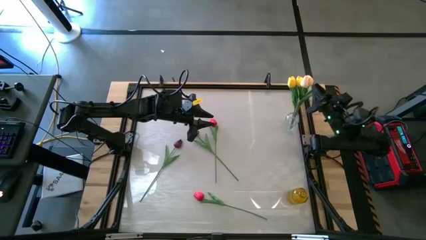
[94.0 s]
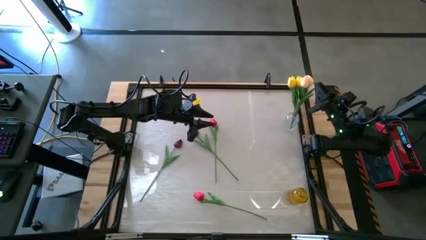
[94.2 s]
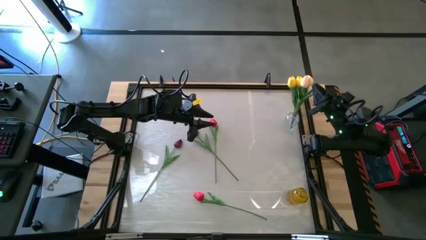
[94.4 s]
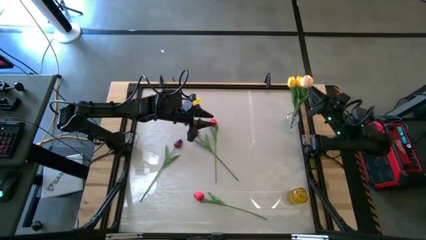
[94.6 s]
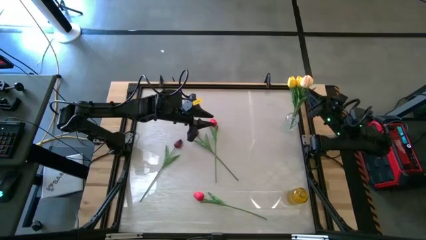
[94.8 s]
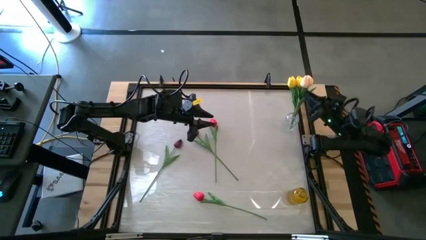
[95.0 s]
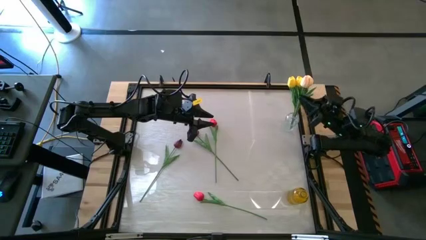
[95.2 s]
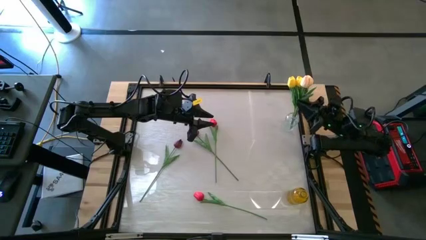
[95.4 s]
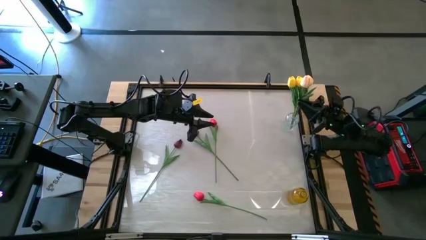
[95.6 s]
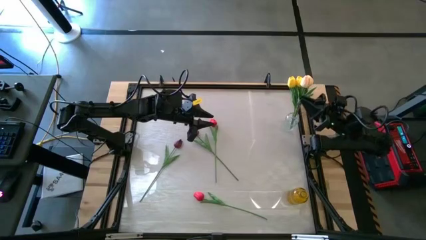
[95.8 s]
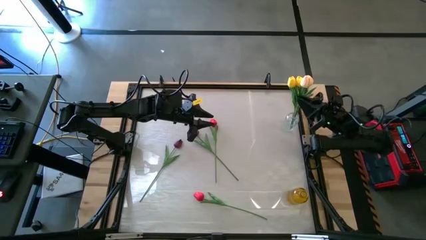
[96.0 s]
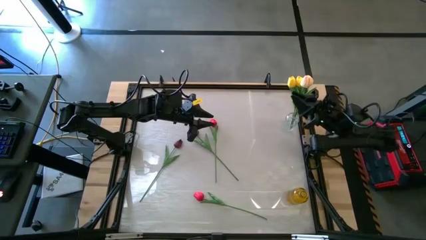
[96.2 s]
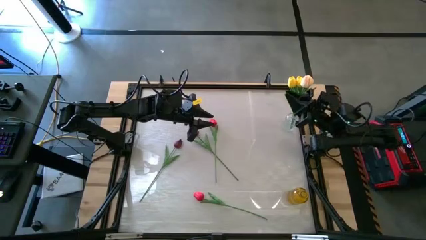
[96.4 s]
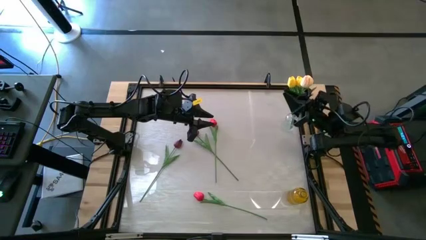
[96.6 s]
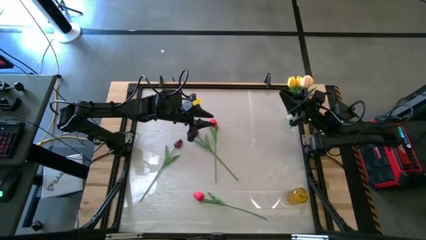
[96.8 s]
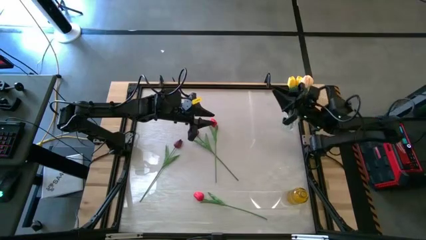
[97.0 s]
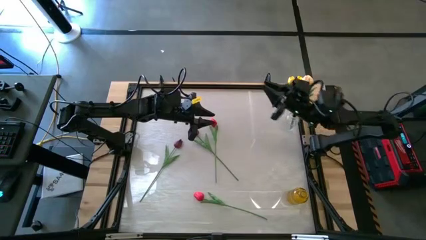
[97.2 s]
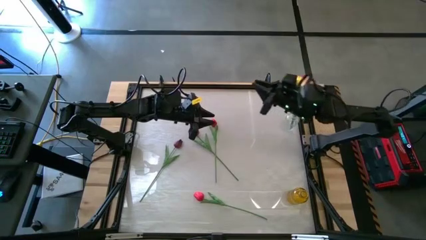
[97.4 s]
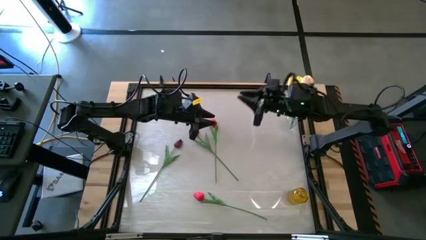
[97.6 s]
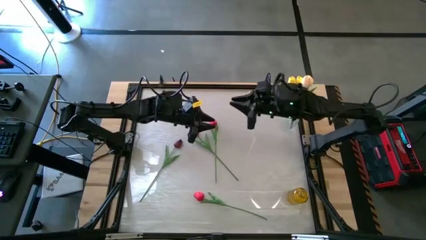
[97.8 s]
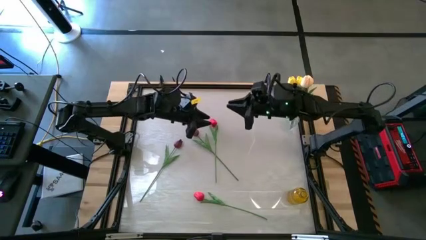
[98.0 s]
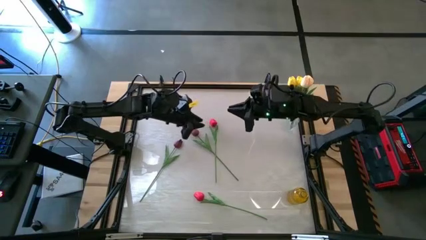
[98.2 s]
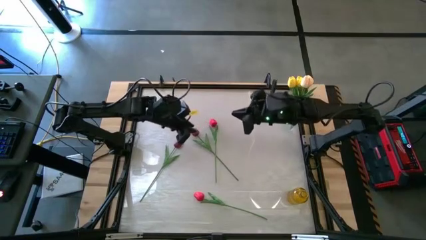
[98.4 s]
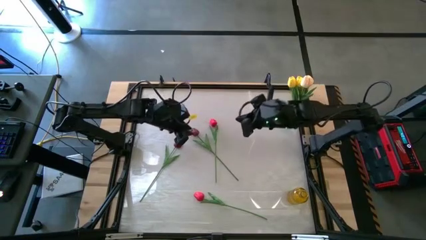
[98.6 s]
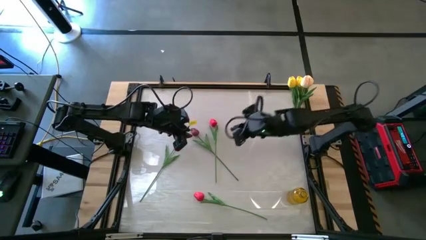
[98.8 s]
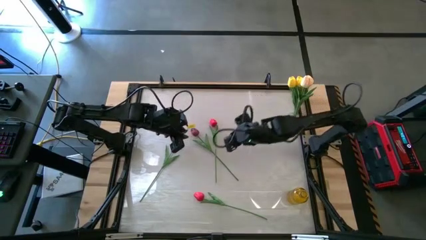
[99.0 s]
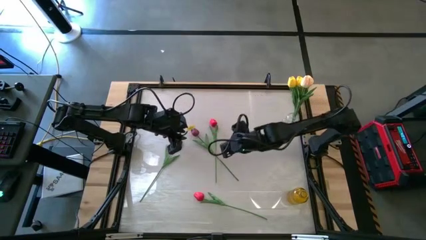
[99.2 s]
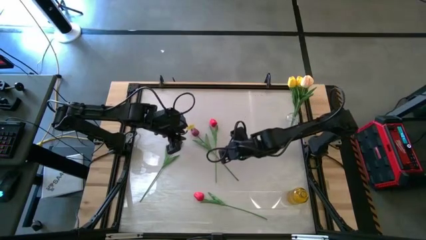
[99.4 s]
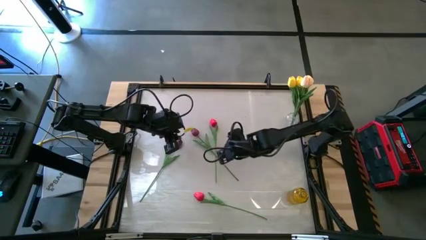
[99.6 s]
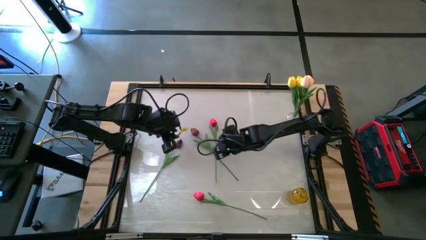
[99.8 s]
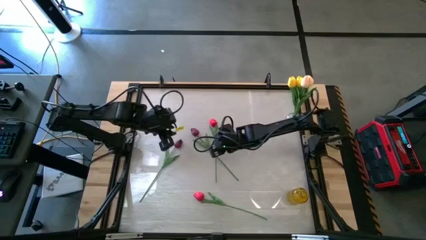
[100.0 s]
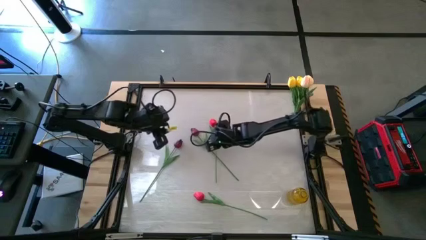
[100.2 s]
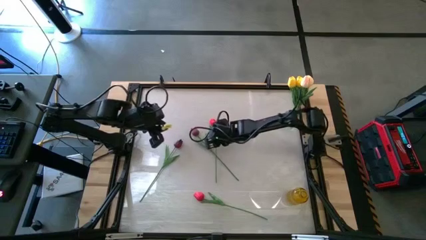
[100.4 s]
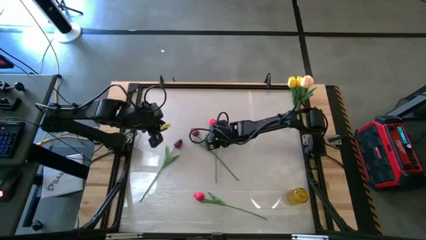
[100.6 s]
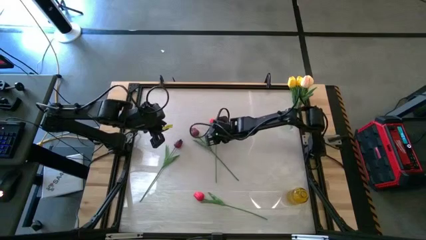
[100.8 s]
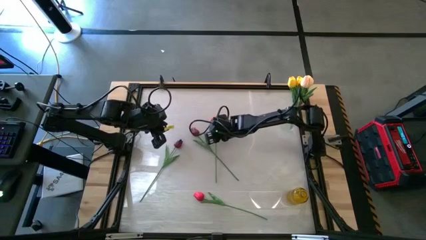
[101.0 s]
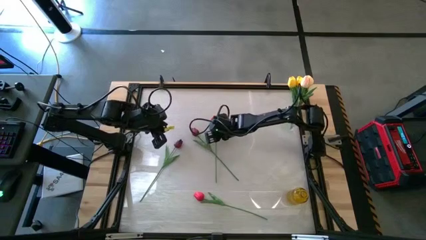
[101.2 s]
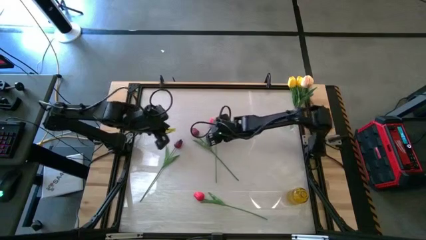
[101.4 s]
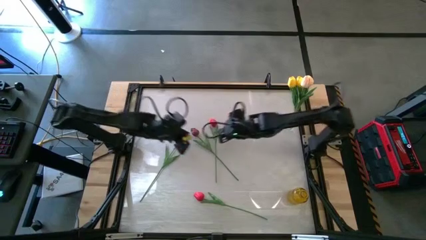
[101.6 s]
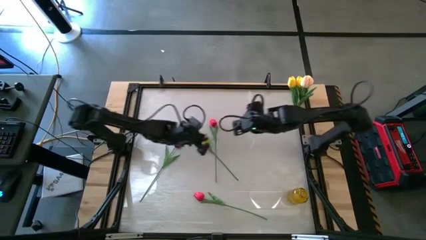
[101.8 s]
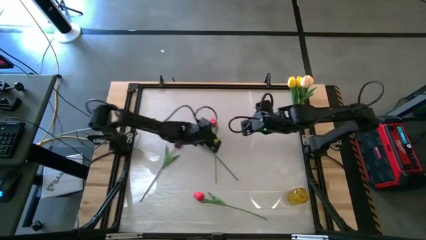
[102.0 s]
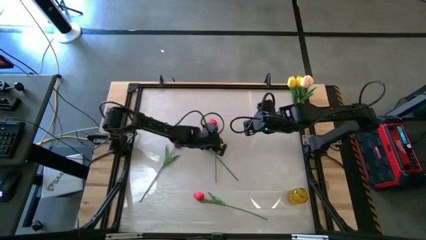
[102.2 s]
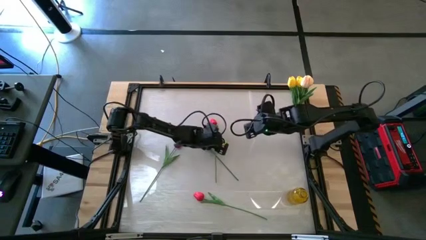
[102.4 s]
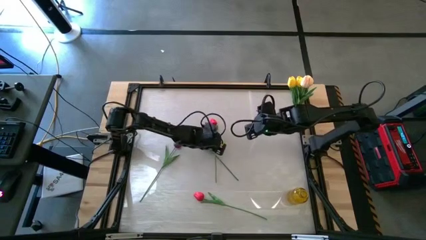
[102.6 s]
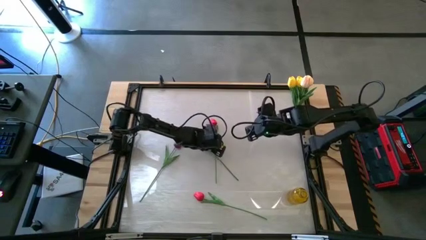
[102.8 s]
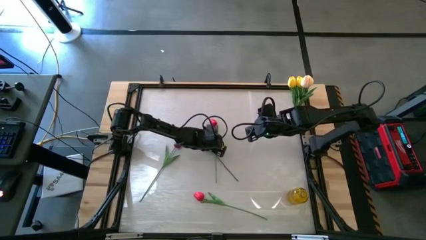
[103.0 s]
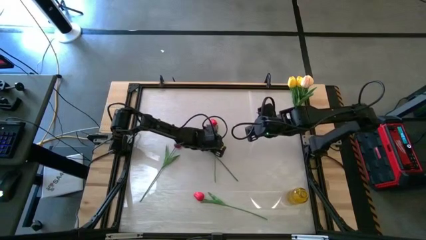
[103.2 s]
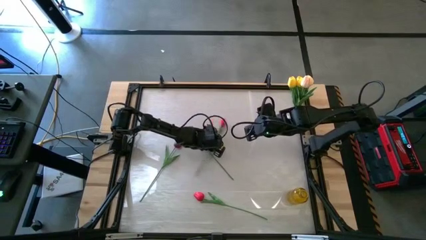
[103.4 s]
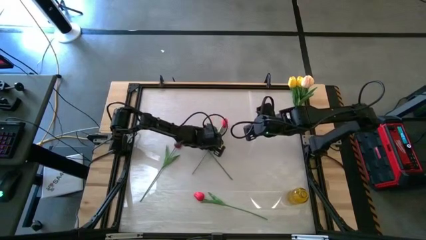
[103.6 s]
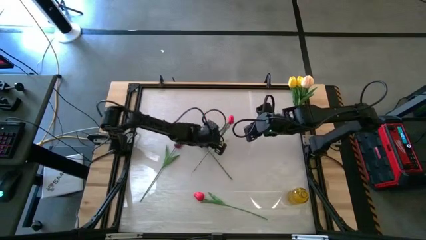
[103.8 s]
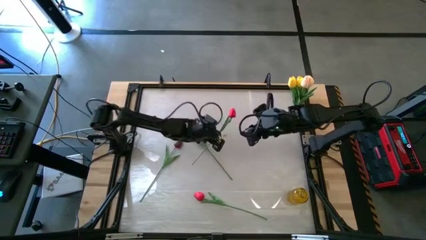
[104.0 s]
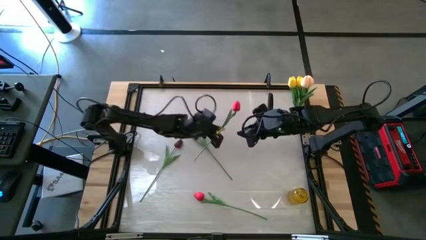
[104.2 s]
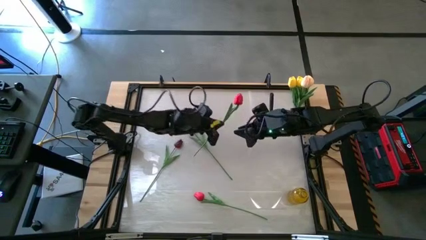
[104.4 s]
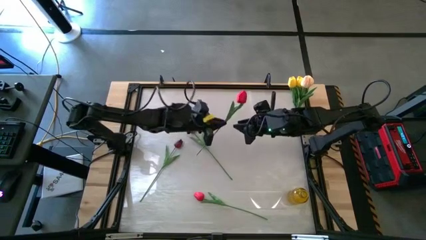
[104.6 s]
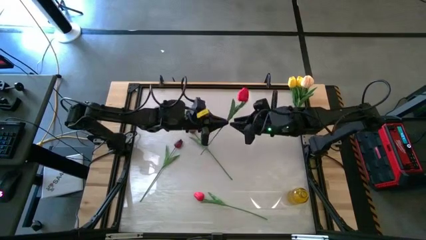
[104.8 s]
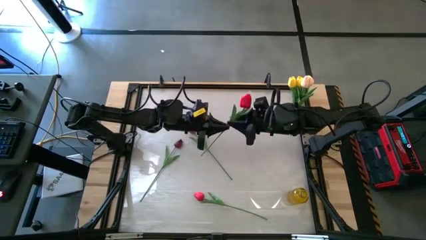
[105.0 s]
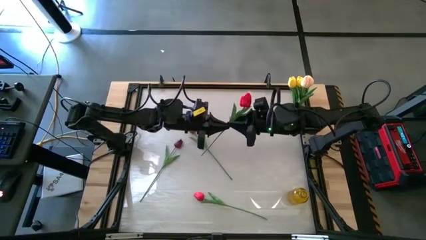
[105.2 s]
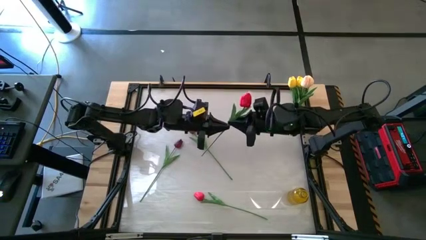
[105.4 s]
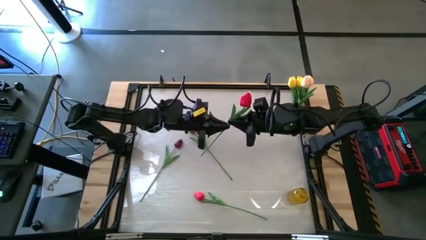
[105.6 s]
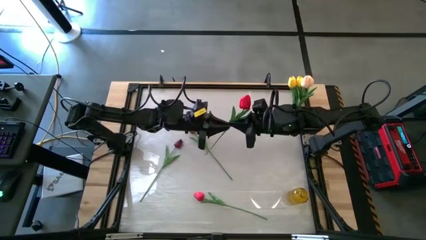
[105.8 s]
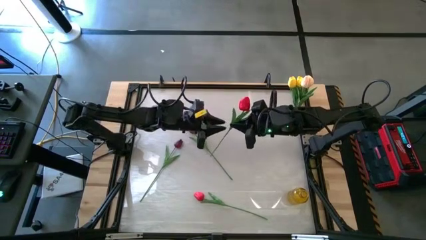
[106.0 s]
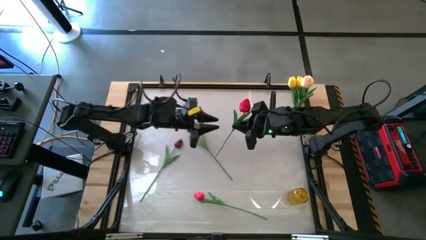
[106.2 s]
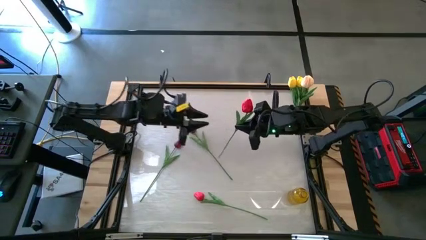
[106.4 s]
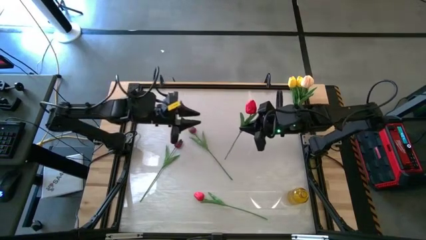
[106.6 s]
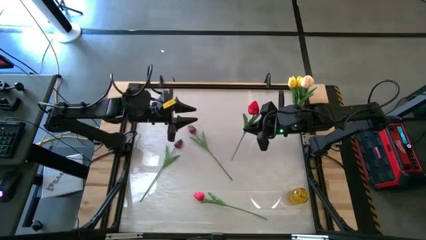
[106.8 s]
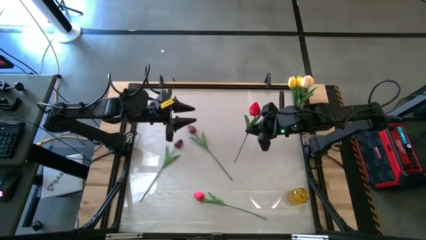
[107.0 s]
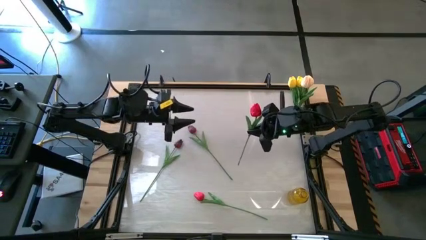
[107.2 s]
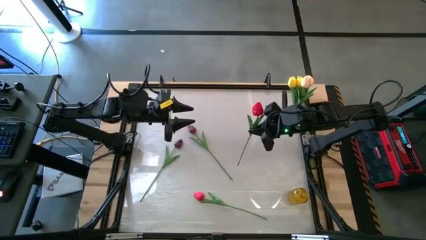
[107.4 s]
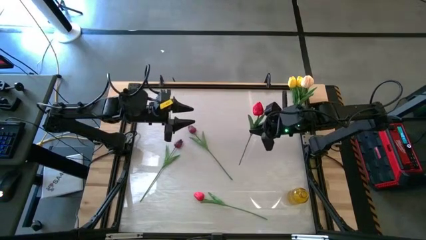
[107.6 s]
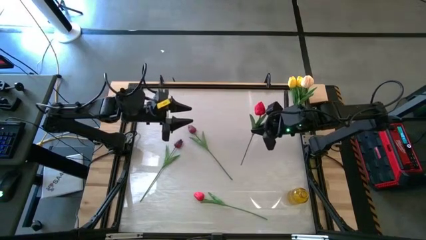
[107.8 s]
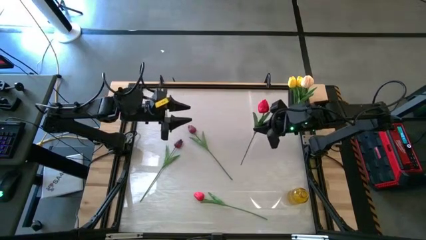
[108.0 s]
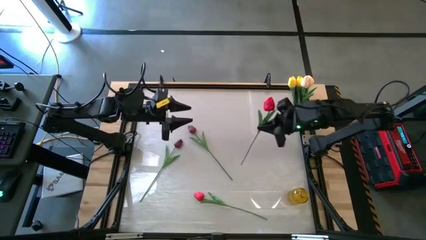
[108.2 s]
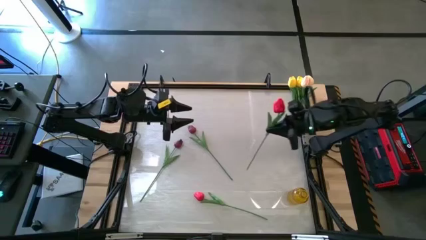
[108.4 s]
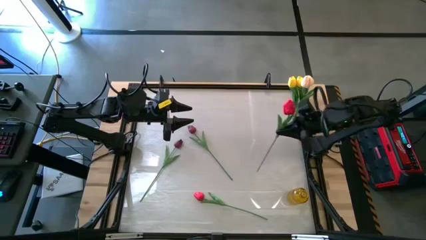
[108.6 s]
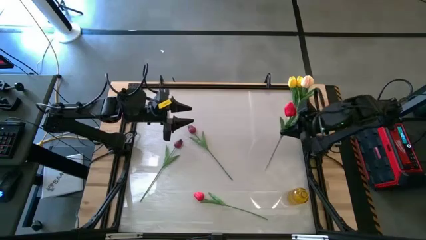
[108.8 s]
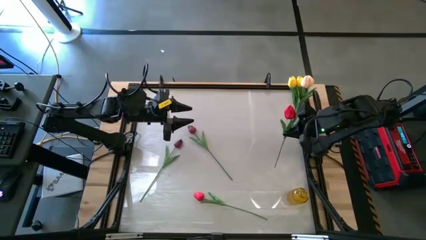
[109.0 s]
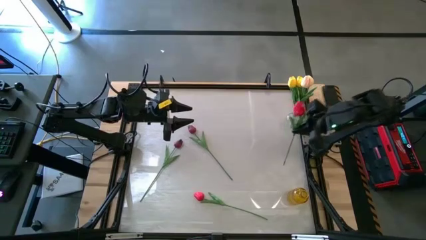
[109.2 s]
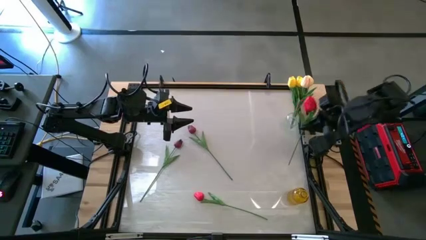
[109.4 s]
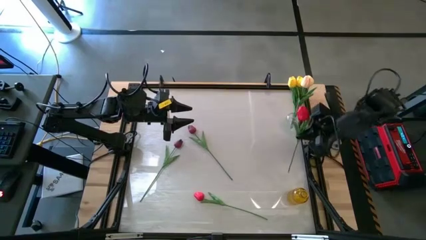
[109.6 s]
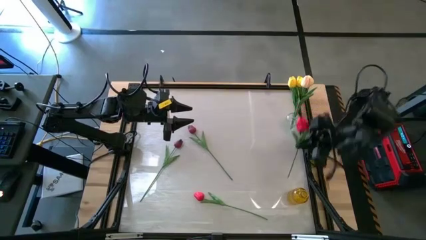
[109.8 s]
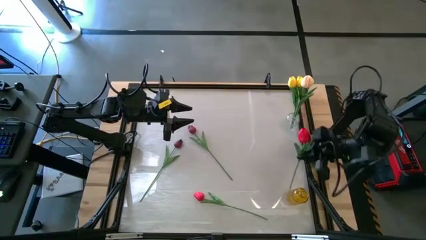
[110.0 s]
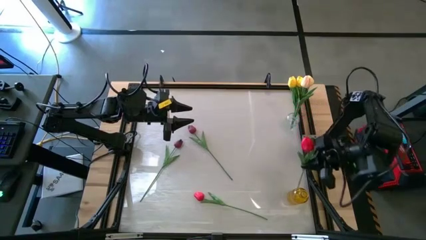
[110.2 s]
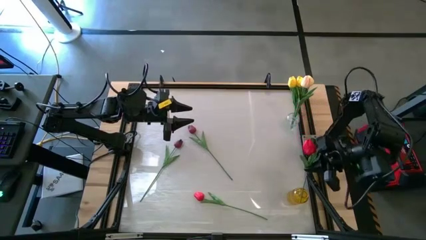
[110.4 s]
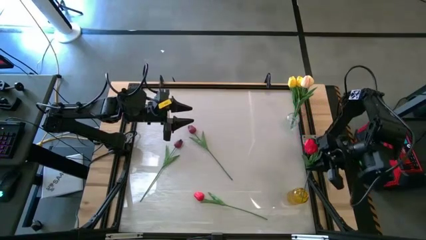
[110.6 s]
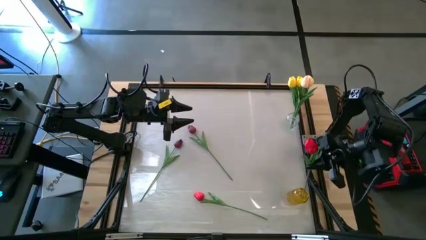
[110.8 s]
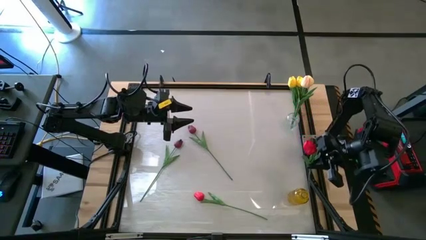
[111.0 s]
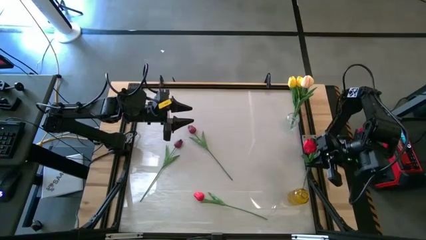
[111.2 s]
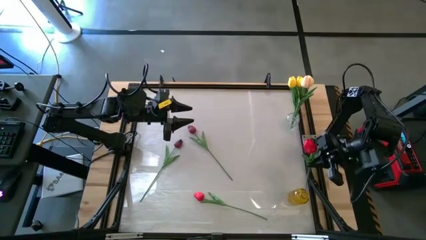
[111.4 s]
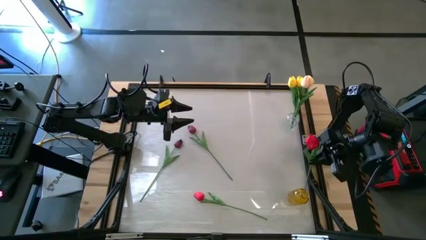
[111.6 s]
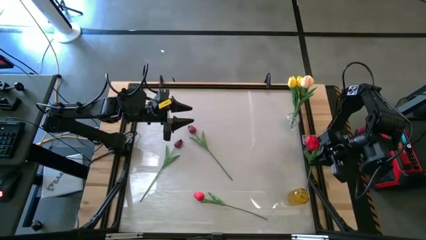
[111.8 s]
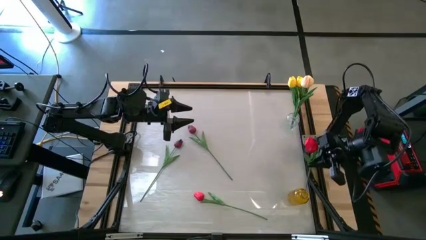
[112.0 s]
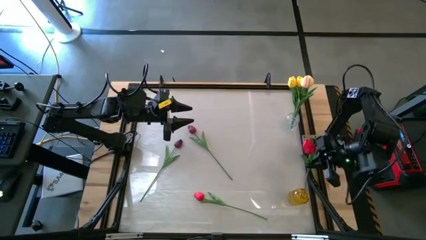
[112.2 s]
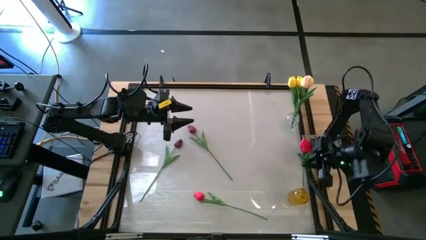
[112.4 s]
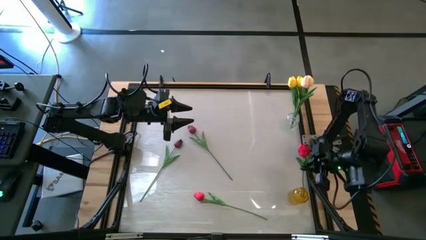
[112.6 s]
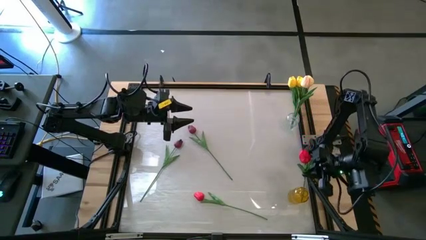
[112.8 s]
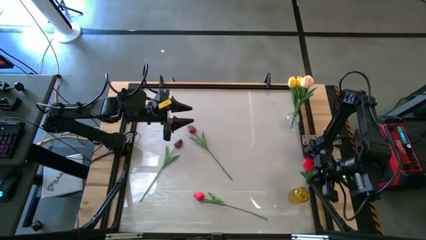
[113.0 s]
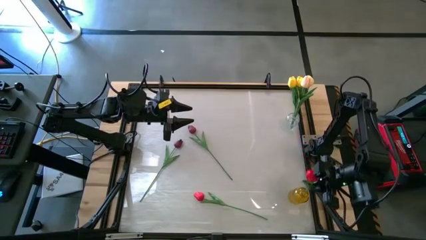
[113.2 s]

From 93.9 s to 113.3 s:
Task: Sort flowers into vase by color
Put the top red tulip into the yellow vase
